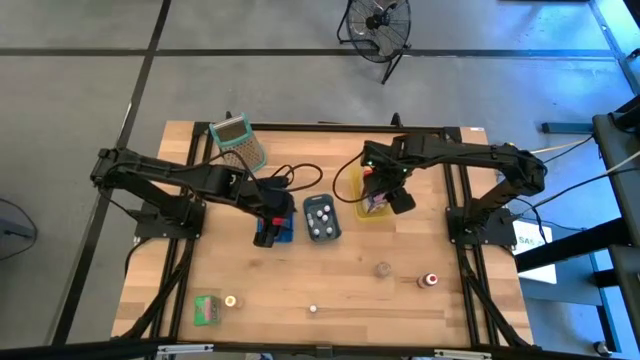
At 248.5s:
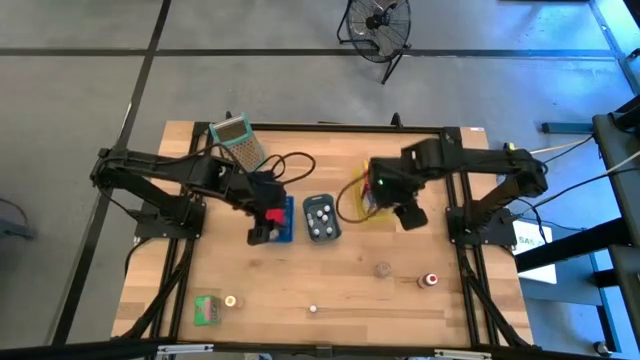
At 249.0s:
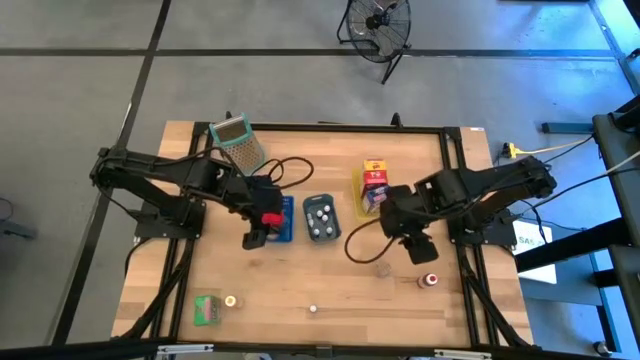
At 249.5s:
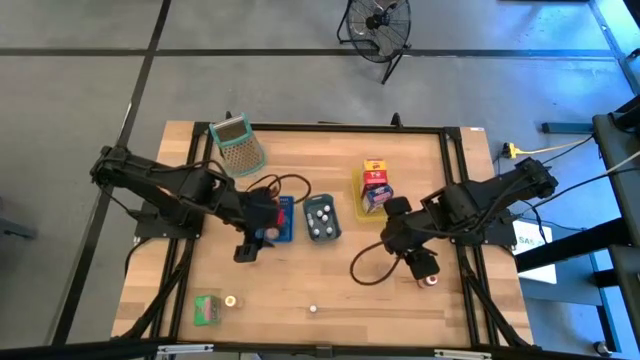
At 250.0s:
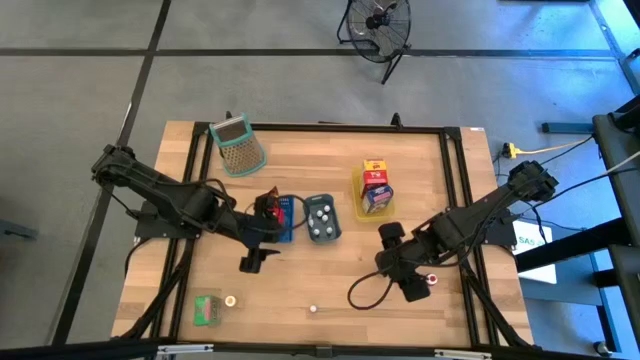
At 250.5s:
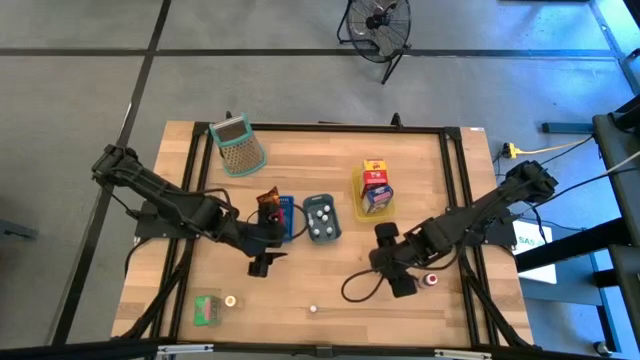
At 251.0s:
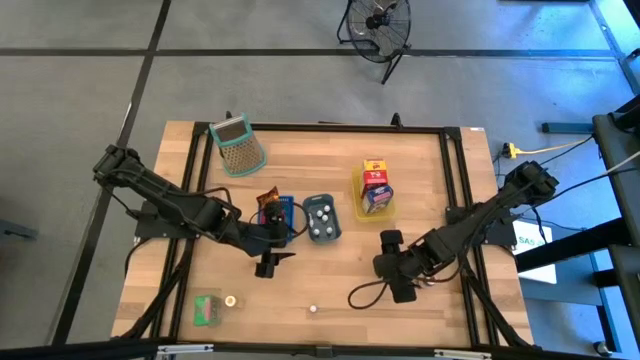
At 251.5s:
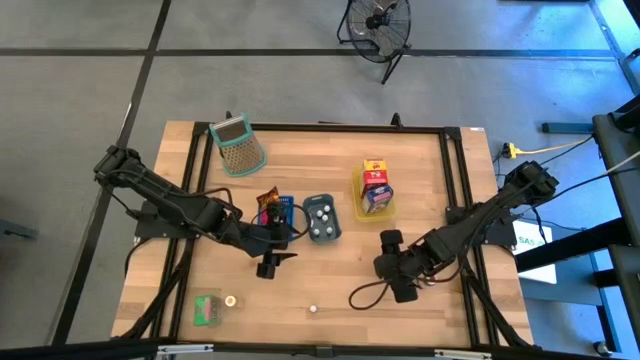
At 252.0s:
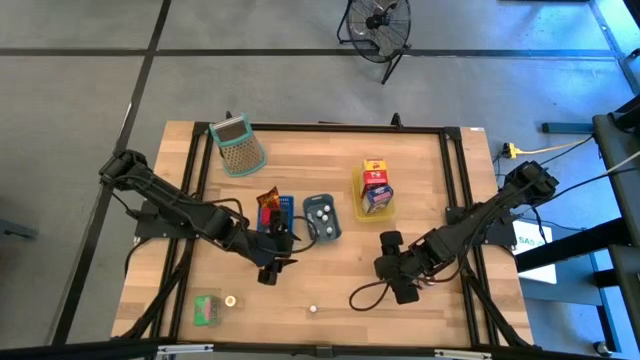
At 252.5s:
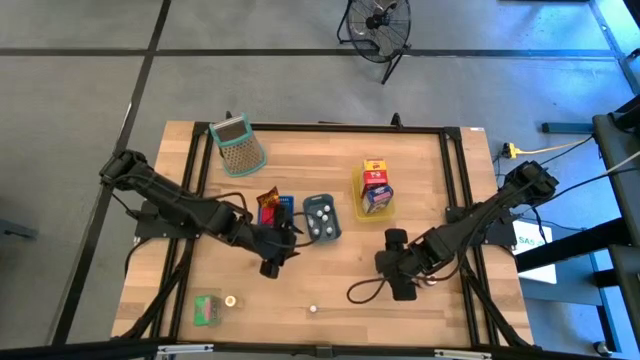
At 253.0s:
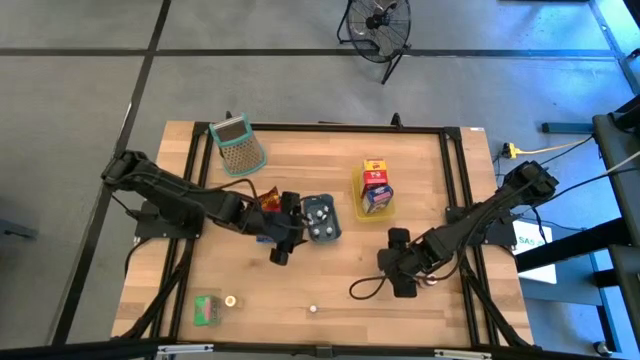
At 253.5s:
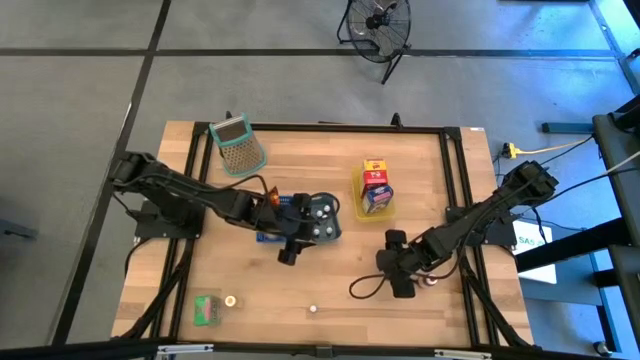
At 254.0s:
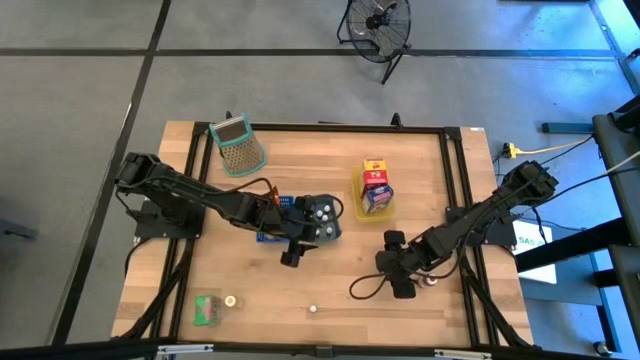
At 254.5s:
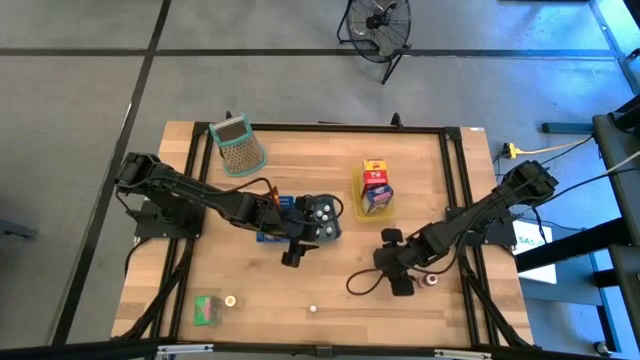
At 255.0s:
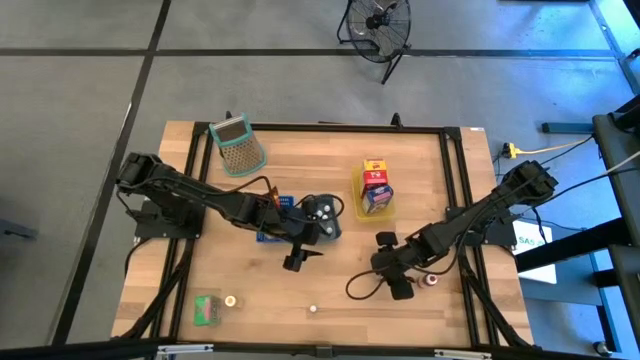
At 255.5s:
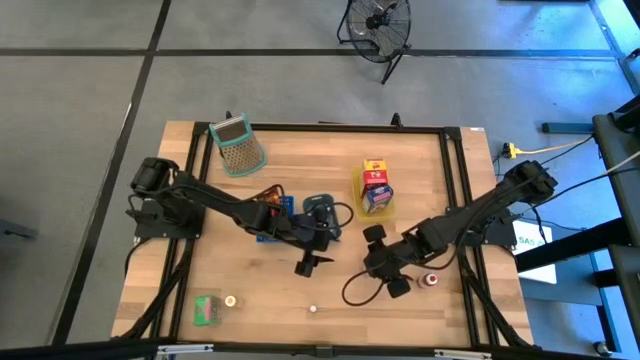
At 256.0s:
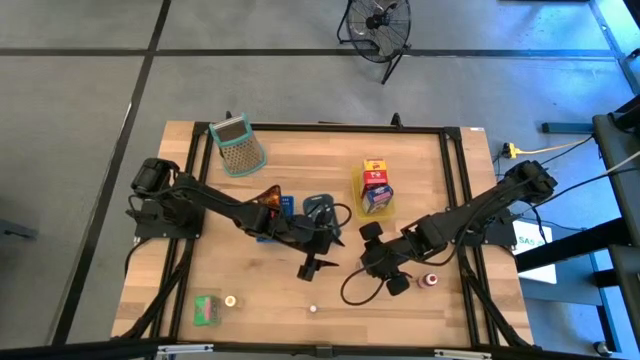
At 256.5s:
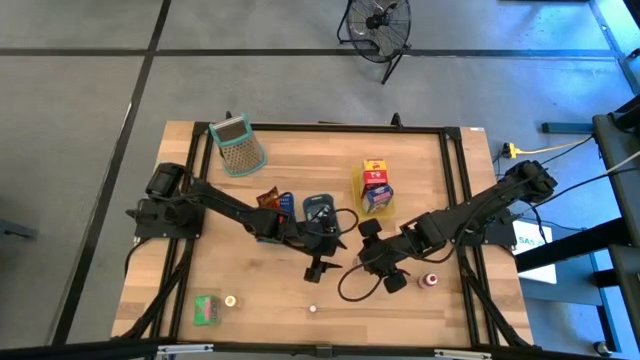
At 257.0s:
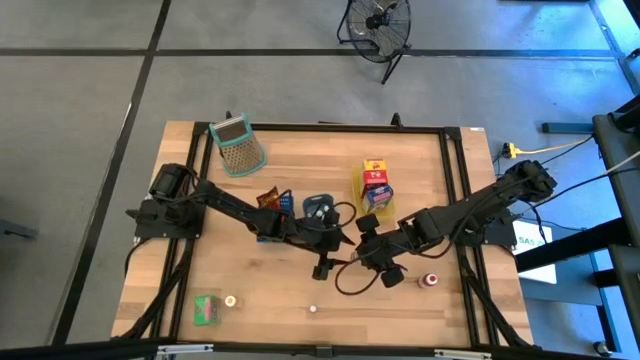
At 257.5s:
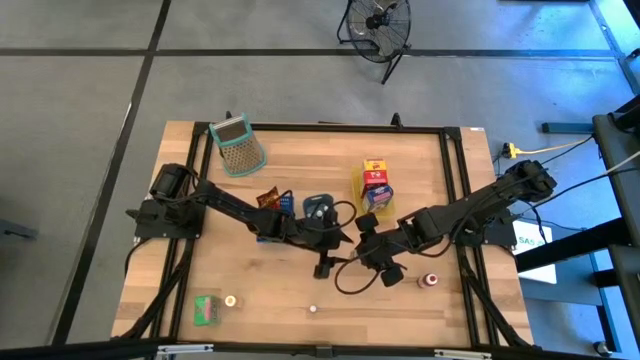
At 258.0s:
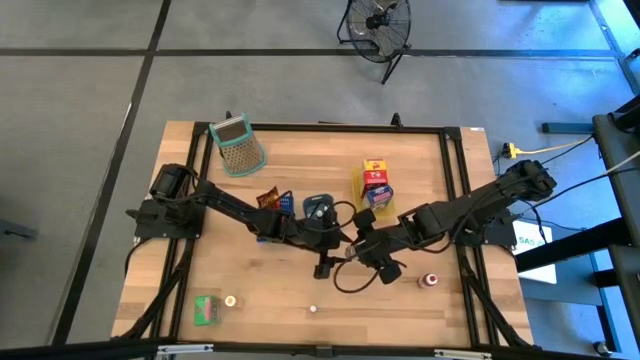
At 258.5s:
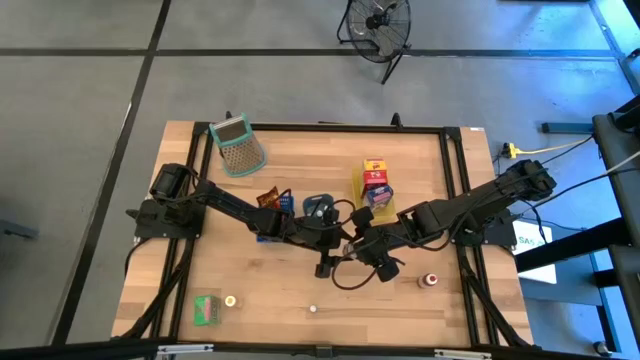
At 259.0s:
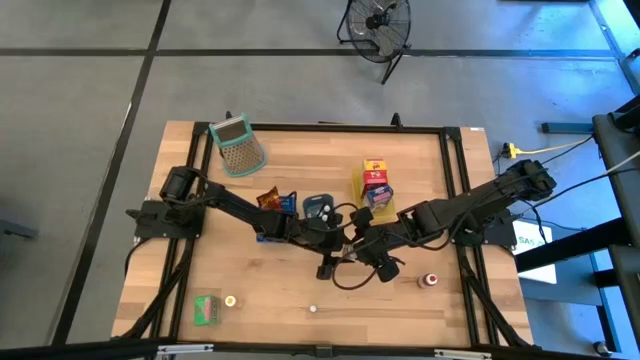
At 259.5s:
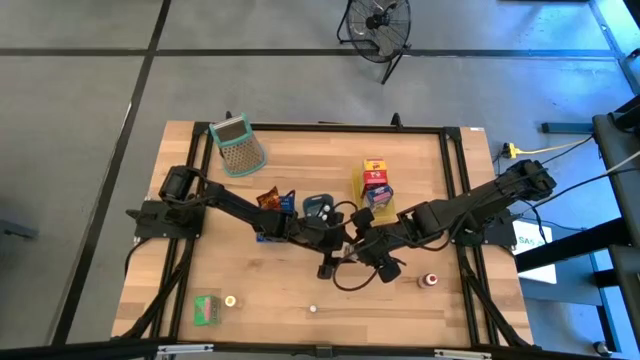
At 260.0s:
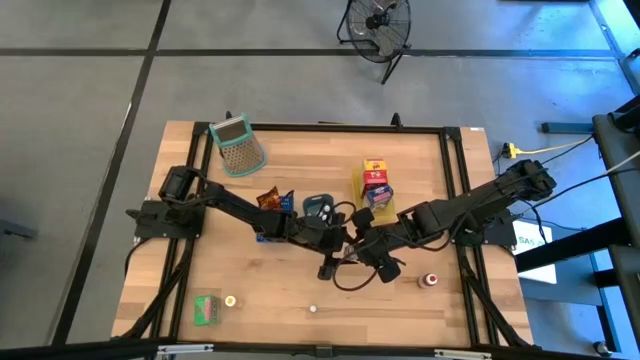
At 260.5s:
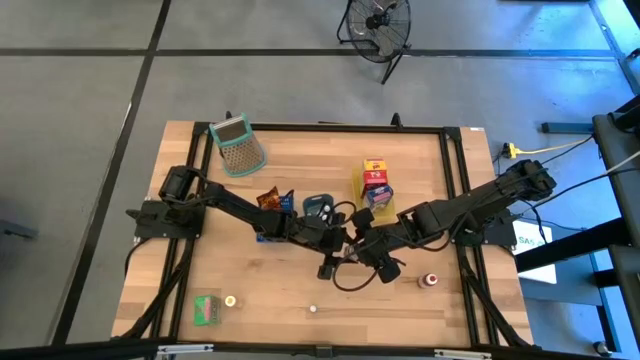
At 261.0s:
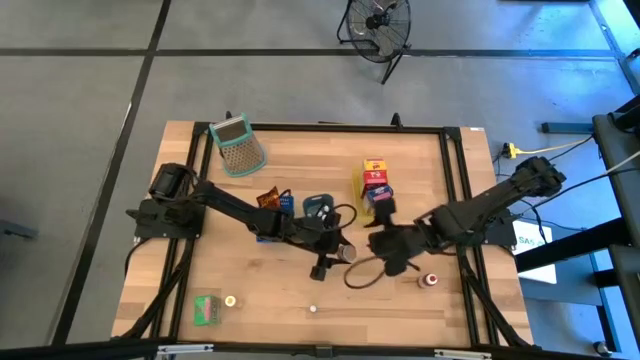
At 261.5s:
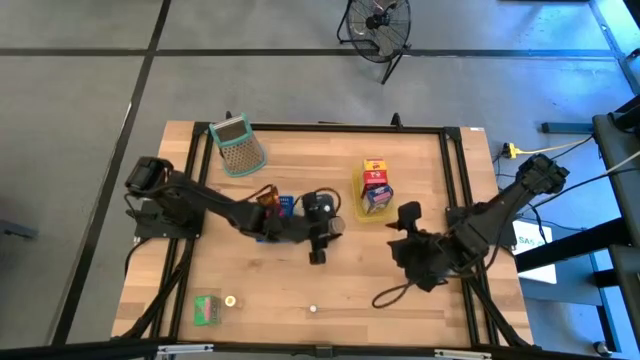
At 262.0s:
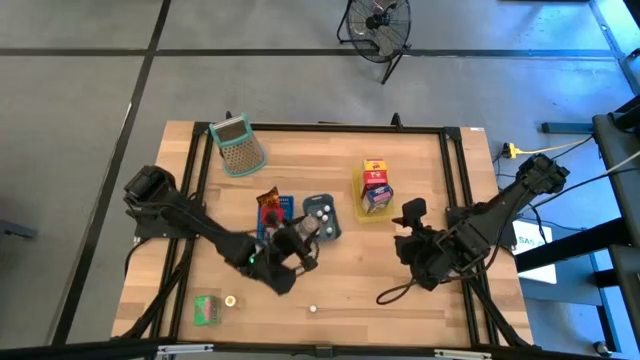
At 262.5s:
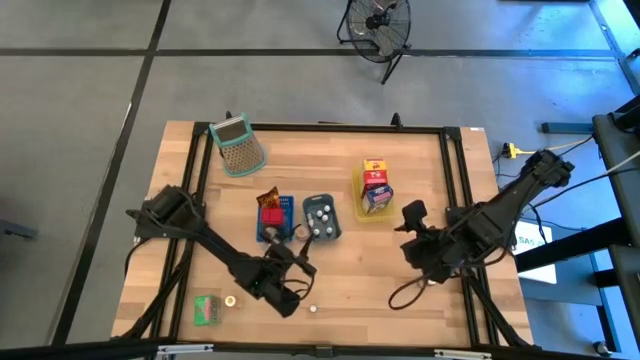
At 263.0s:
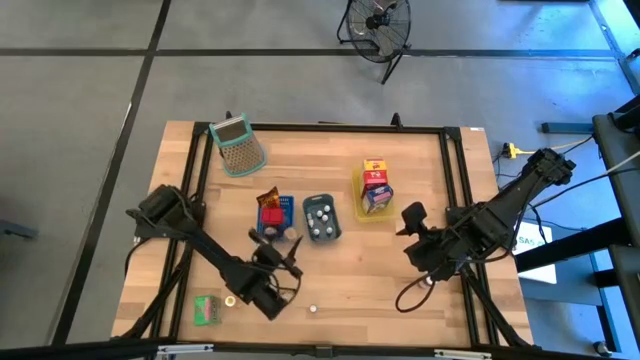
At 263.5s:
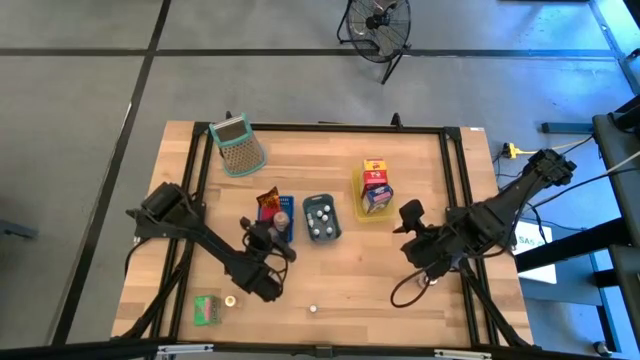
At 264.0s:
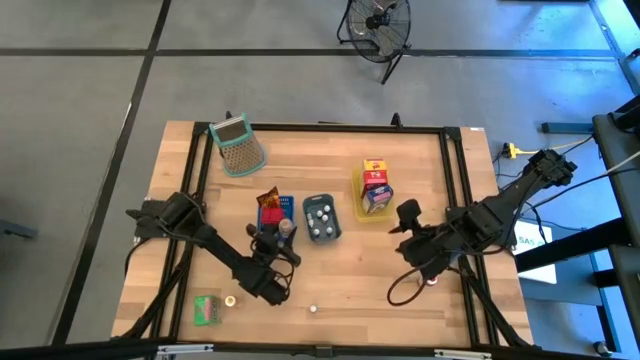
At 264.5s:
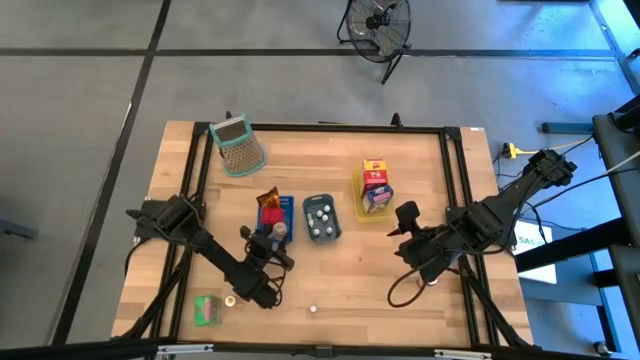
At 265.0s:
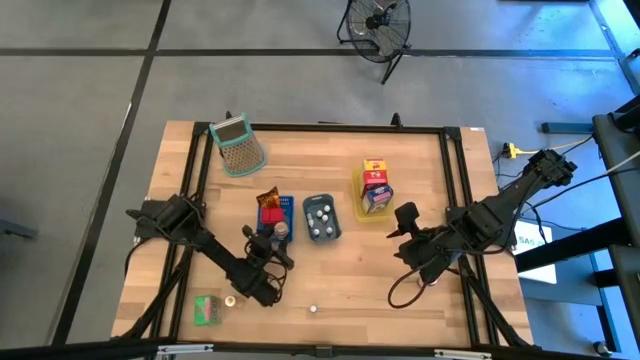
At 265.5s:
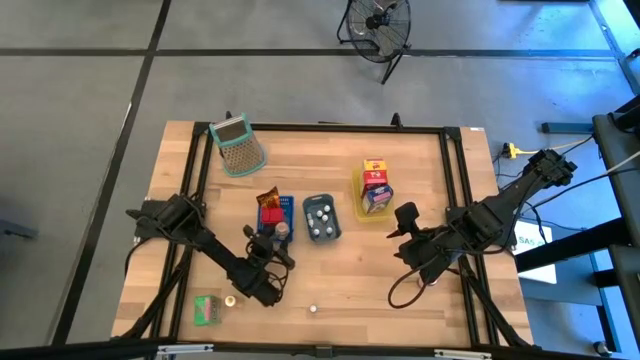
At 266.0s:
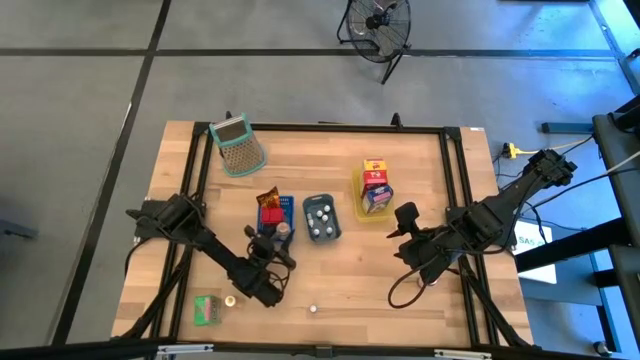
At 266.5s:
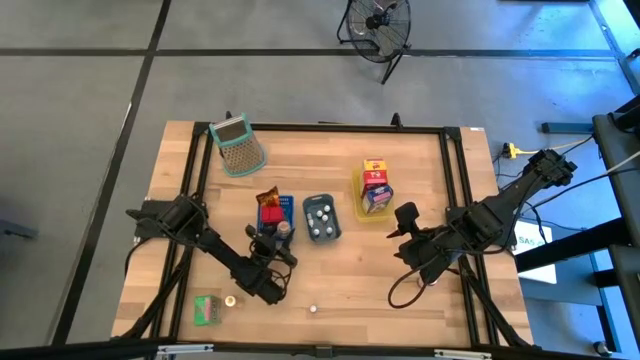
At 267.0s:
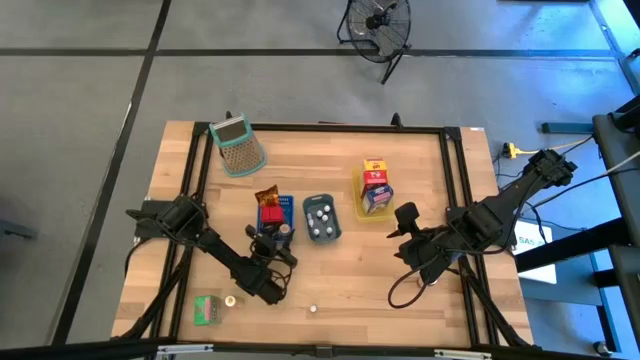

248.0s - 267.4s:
Task: Pick & Place Kitchen Items
Put the brown seasoning bottle into the blue bin

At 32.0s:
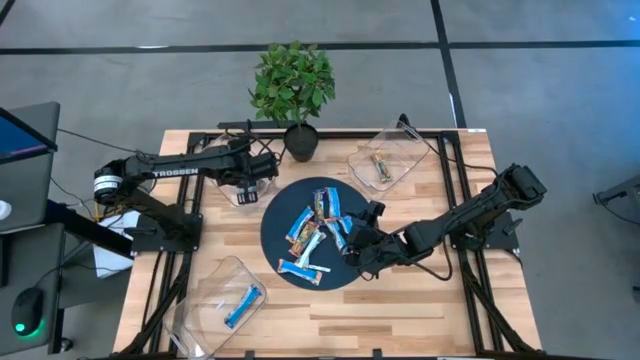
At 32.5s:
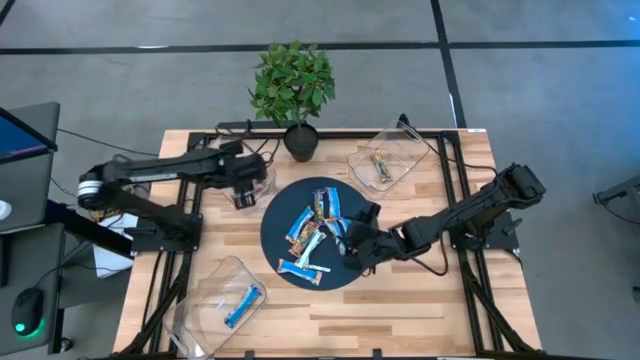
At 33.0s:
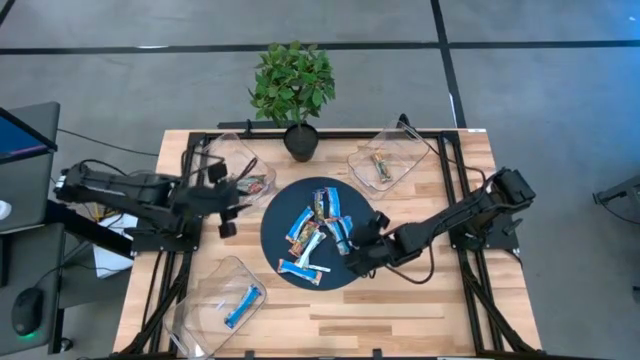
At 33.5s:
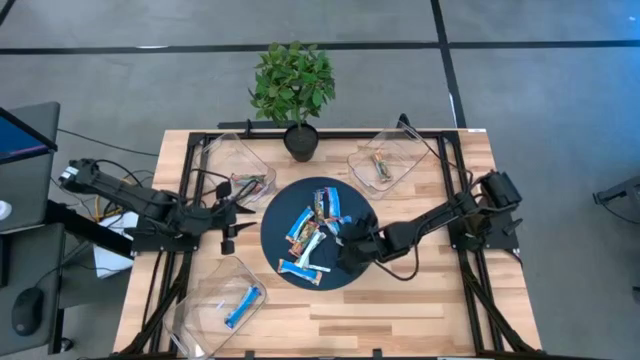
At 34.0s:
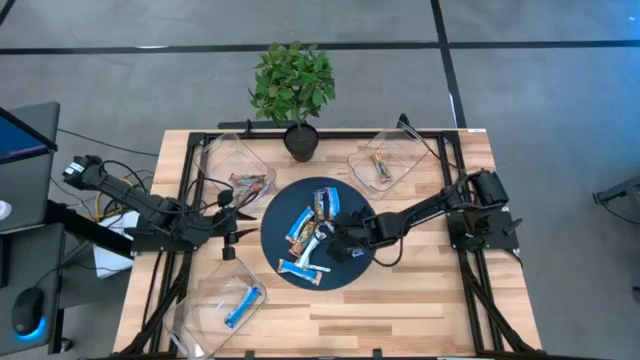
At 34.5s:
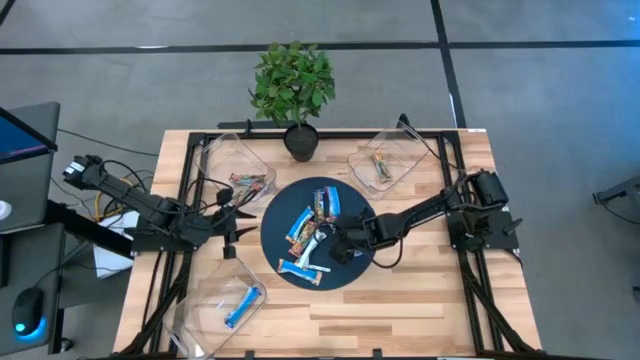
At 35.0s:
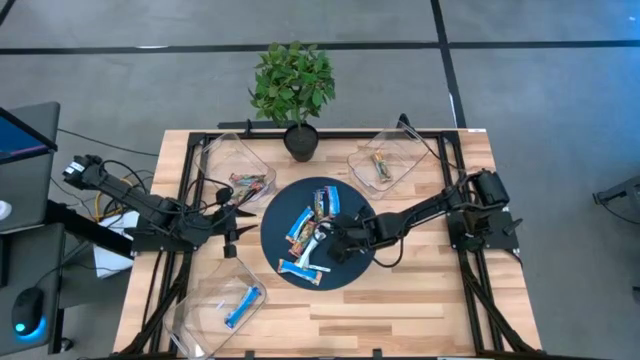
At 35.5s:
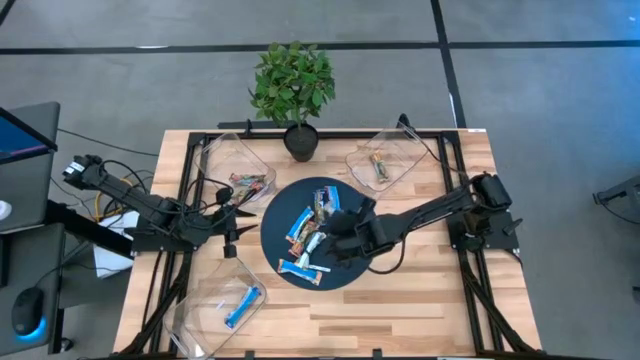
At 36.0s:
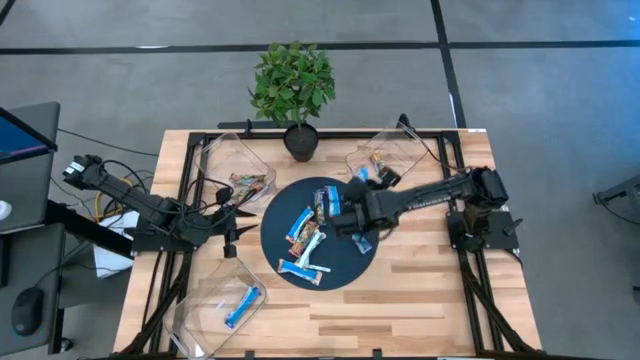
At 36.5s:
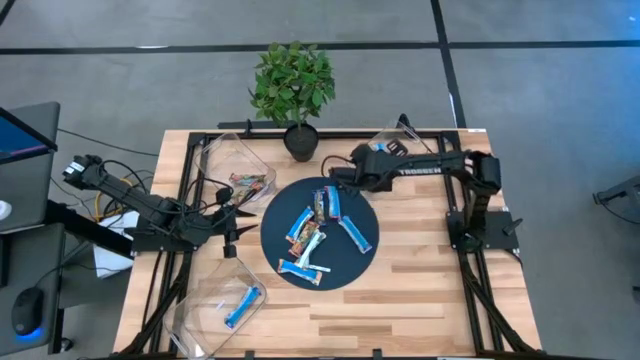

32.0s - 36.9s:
Task: Pick and place Granola Bars by type
Put the yellow granola bar into the top right bin
